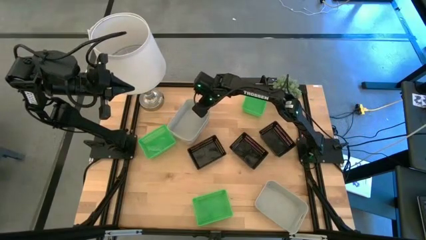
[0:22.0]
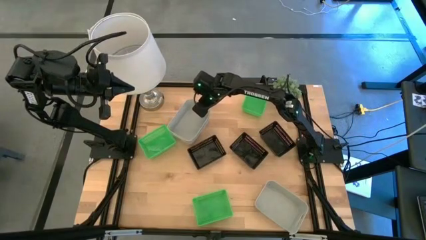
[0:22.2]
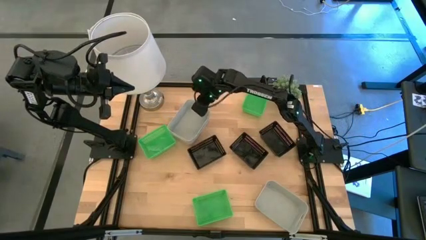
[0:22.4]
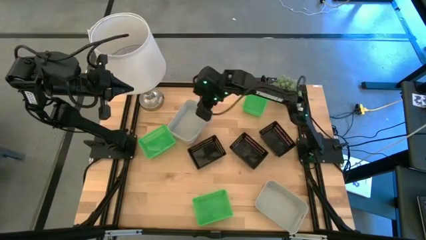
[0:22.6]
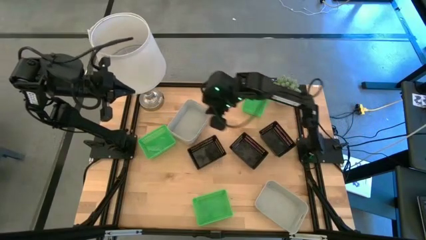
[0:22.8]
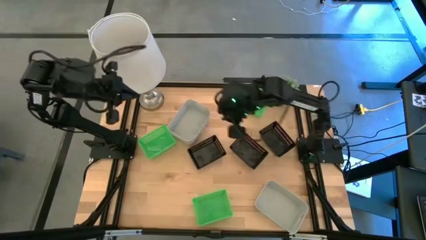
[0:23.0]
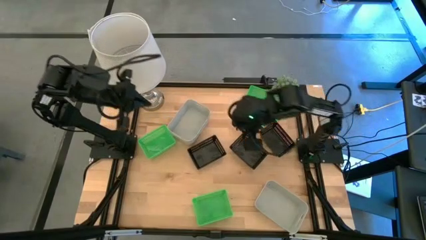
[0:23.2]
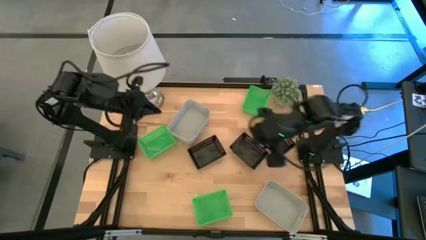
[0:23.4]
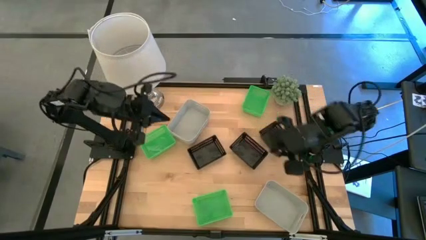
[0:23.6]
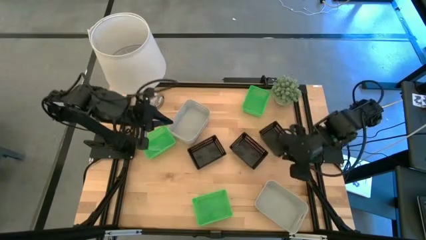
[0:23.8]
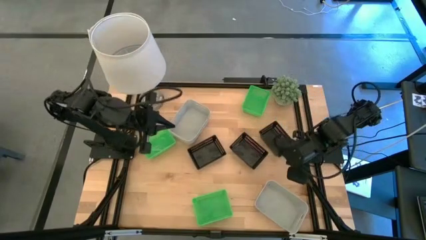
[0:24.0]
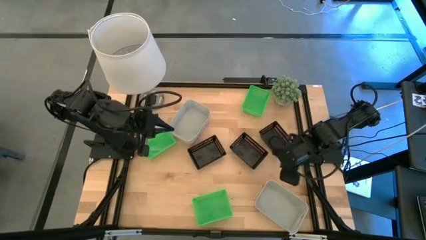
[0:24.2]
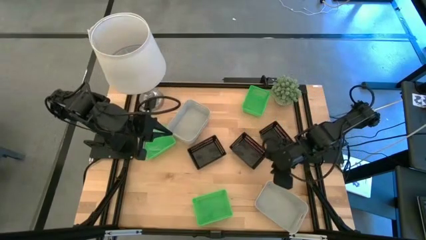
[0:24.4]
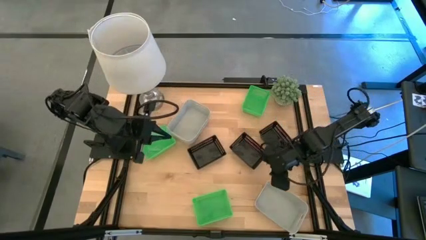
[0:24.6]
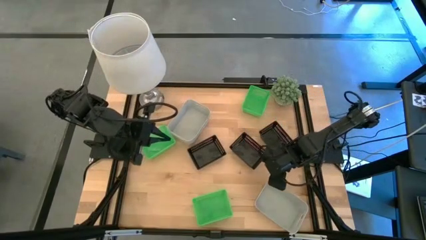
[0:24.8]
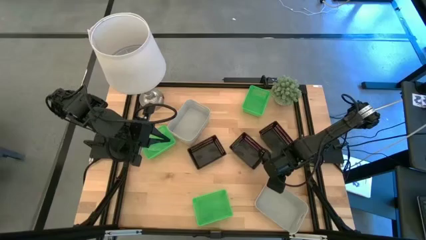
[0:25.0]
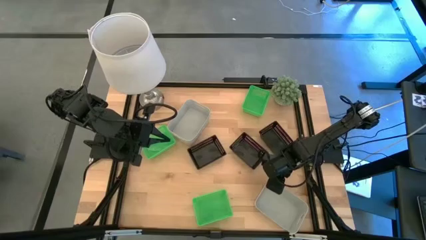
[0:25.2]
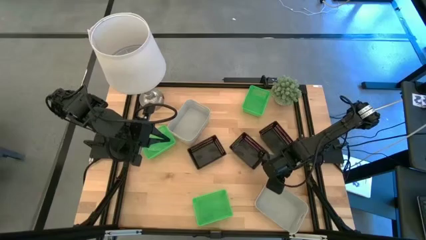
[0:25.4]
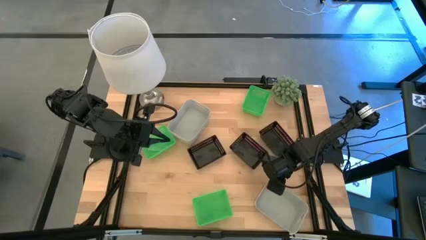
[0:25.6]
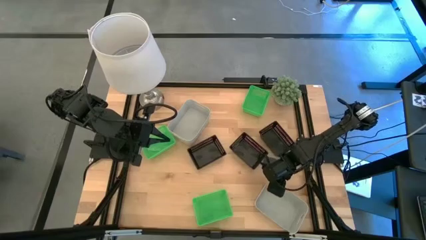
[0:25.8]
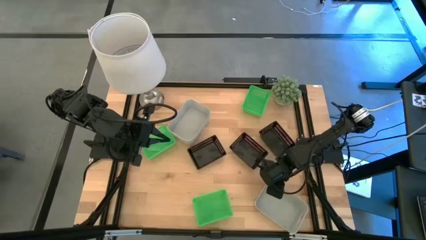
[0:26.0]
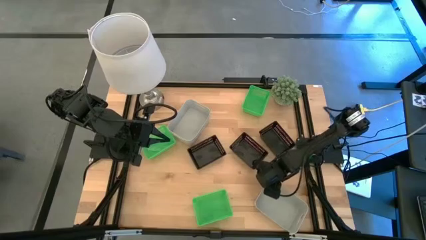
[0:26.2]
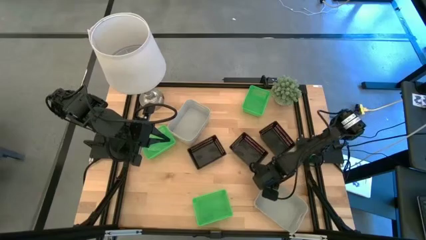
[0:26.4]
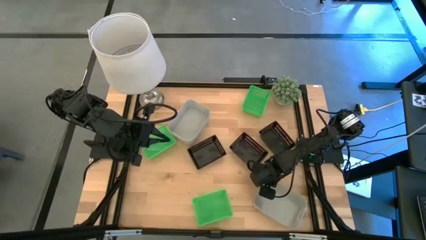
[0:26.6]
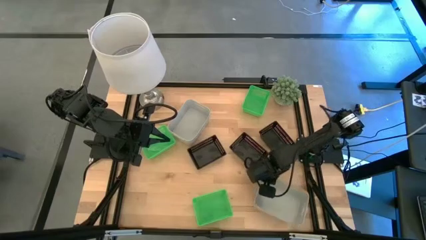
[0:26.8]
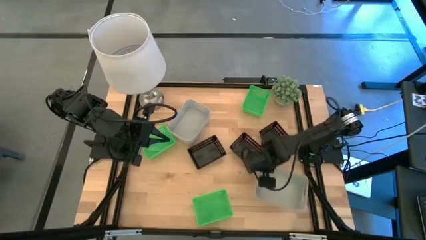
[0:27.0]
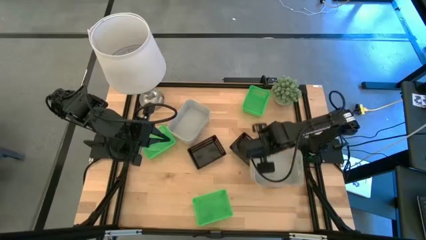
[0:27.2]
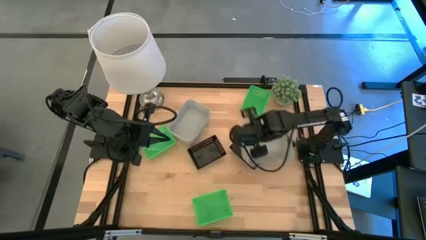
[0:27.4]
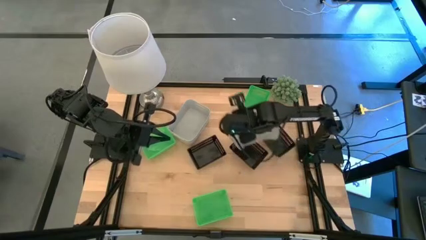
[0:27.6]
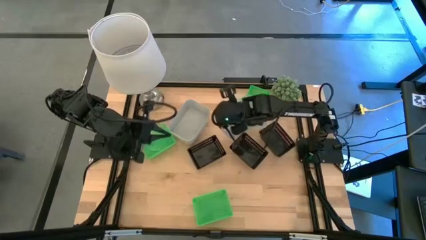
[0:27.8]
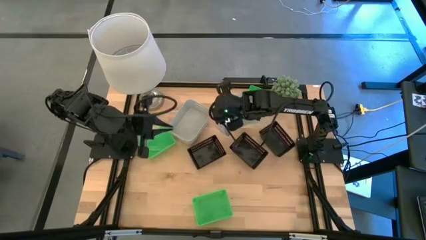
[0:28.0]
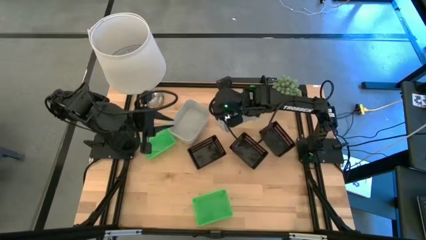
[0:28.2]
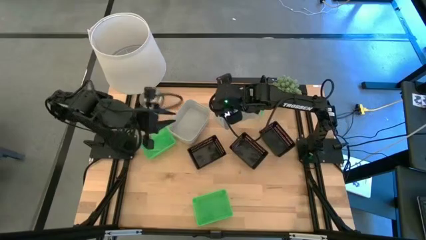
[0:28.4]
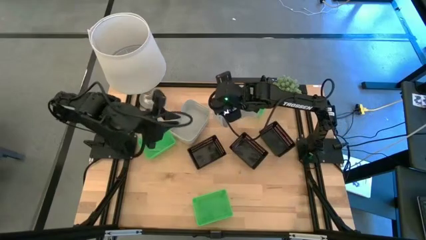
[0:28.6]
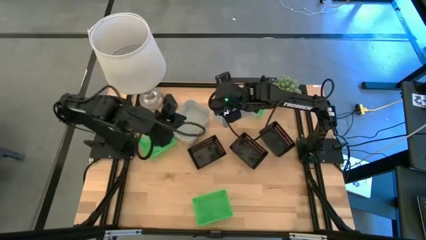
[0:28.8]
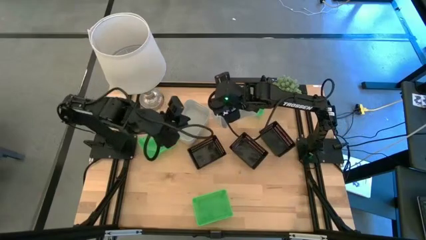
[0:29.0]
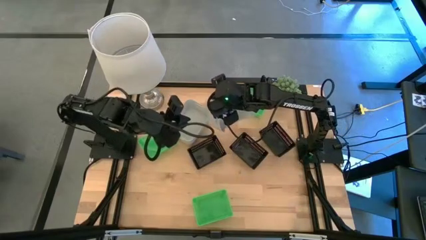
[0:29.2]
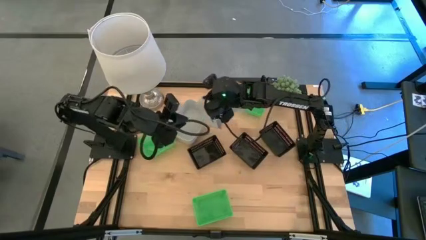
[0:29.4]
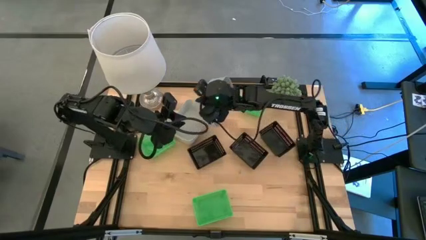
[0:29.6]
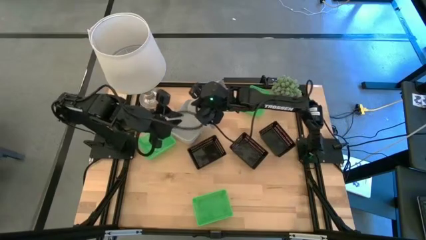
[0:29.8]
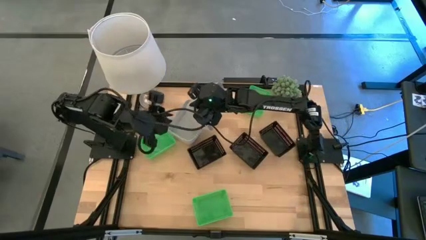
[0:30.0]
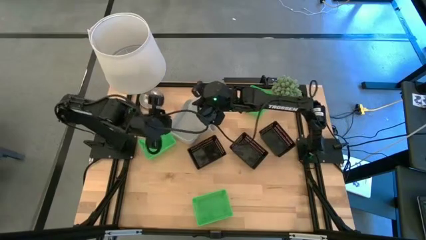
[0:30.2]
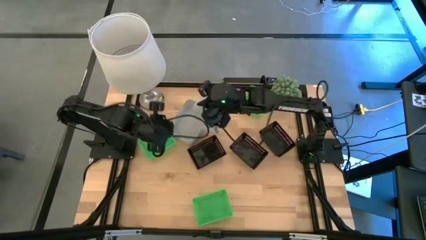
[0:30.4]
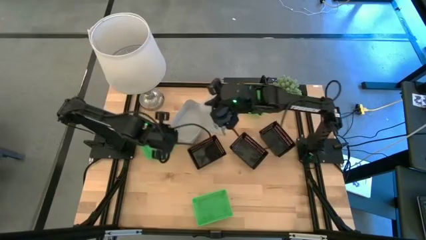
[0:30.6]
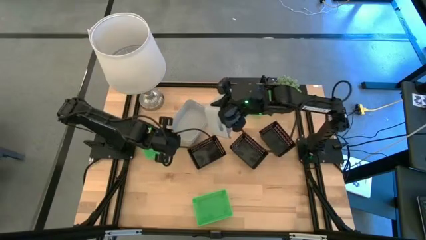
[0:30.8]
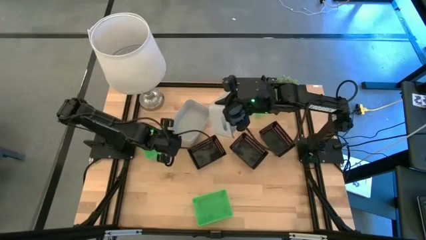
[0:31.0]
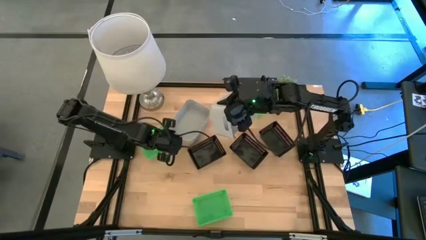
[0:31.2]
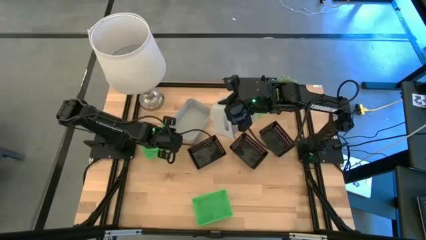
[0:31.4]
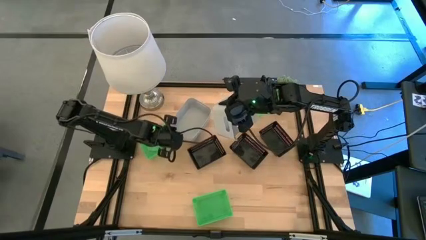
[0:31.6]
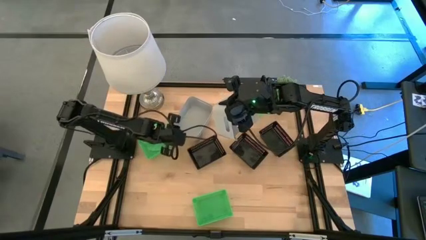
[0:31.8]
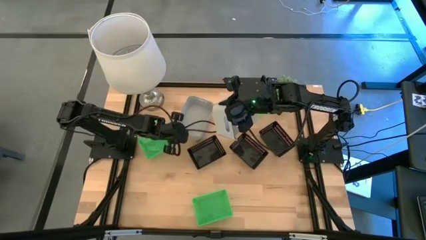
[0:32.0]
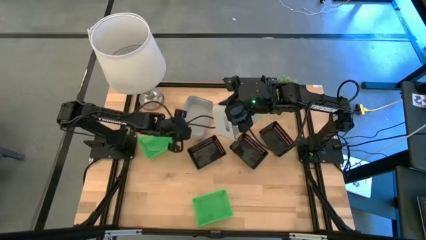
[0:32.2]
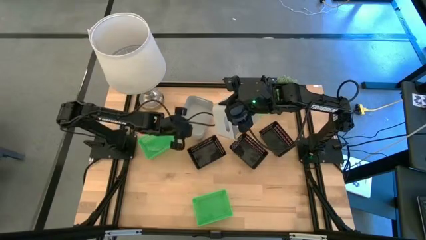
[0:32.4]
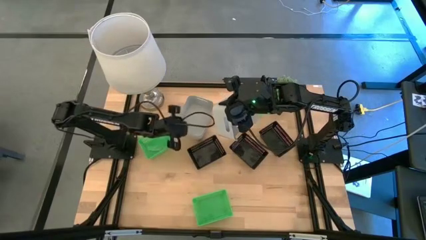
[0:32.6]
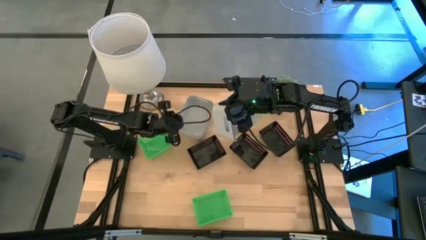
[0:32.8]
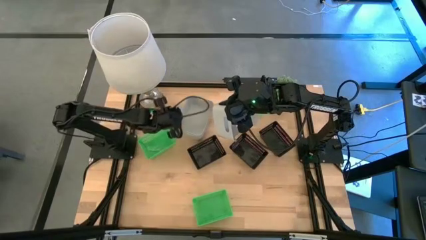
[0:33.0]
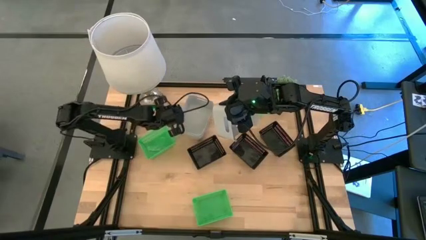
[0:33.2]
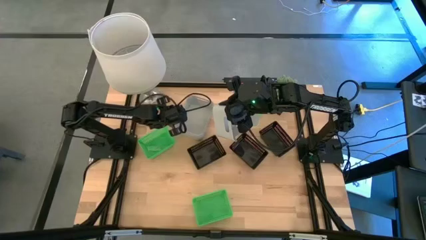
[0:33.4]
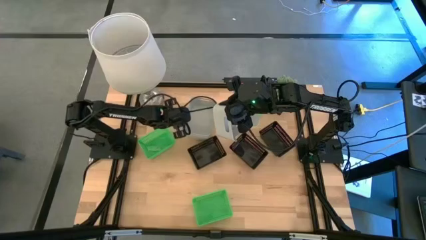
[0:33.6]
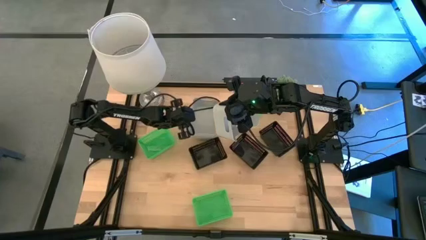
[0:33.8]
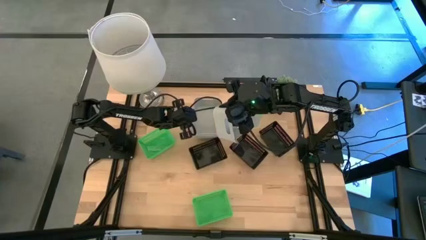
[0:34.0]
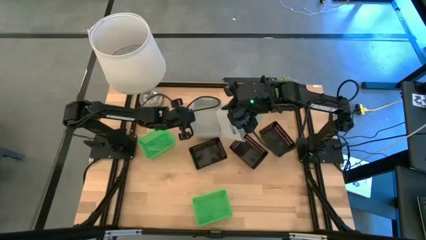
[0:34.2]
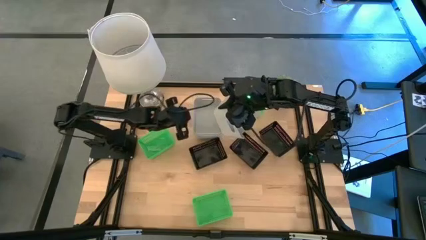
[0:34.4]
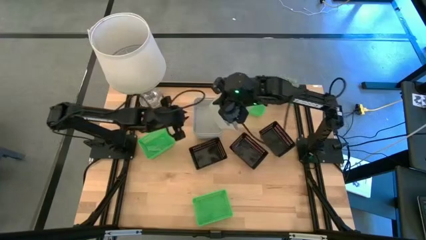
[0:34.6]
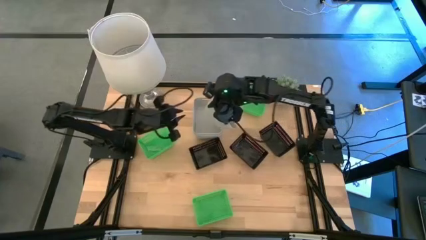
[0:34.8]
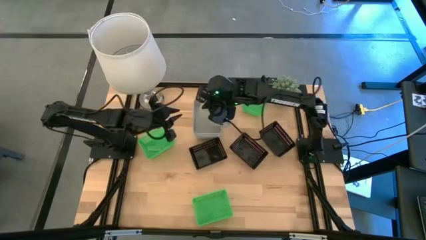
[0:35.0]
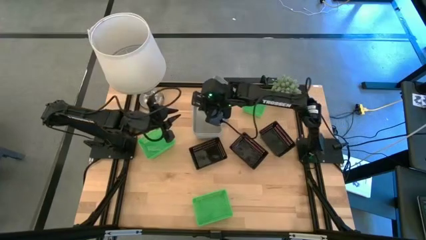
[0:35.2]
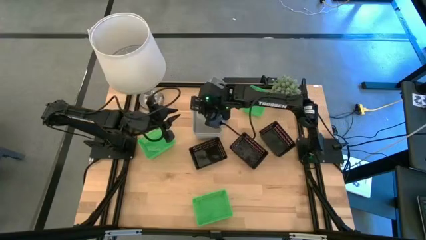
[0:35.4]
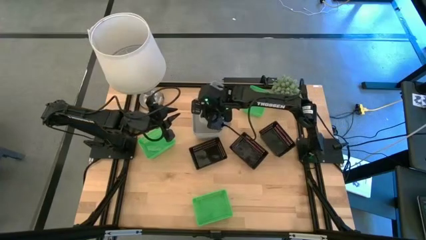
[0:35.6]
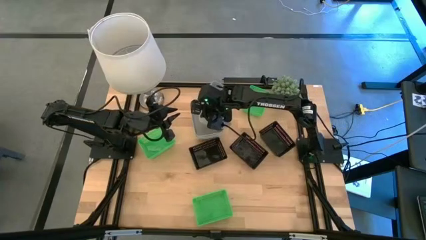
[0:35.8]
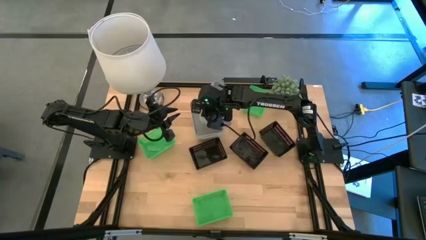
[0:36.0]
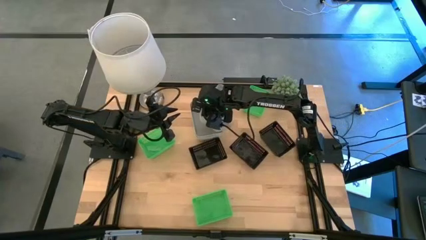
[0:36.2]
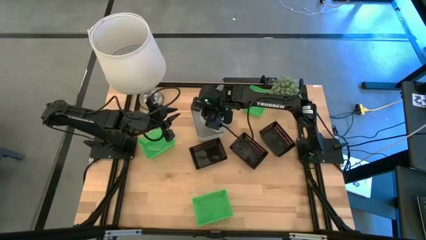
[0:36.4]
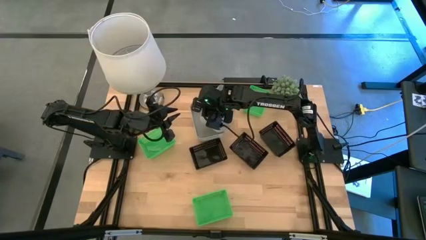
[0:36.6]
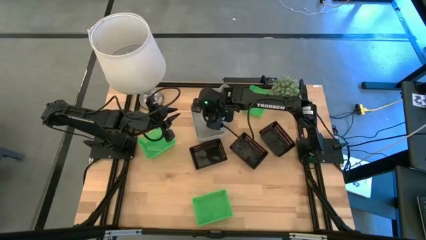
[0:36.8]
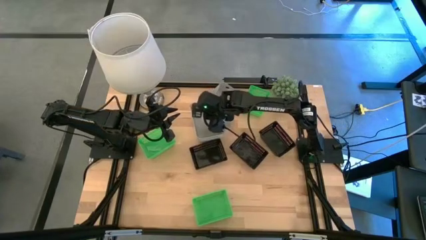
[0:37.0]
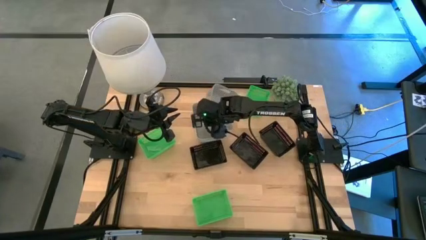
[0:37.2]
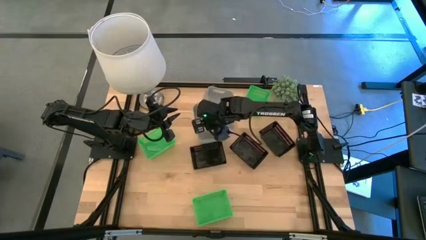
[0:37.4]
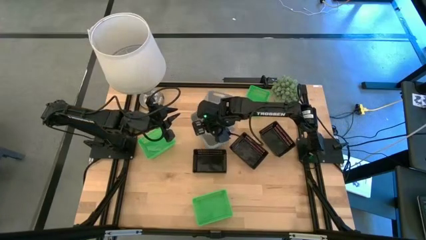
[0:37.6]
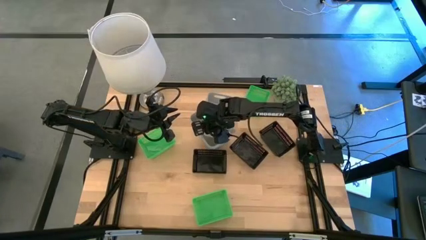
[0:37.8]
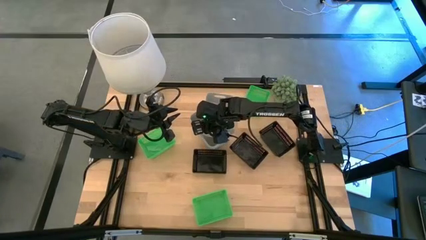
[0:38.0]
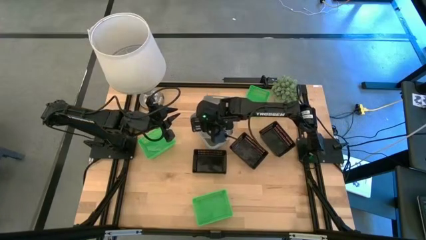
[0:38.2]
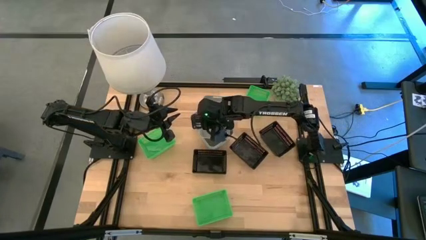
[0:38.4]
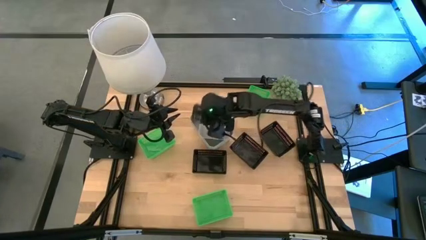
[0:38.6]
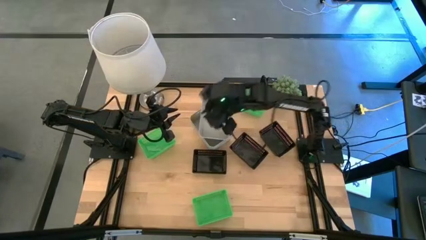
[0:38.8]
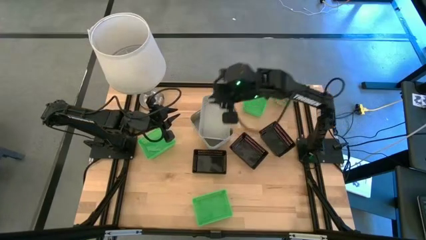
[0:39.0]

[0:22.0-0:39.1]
Stack the bottom gray bin on top of the top gray bin
